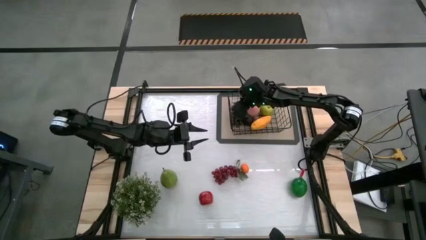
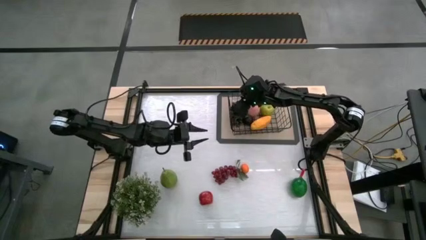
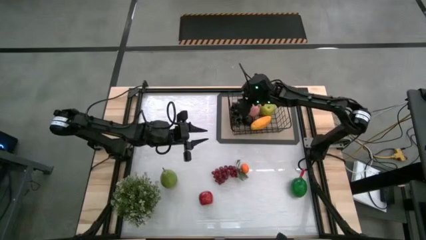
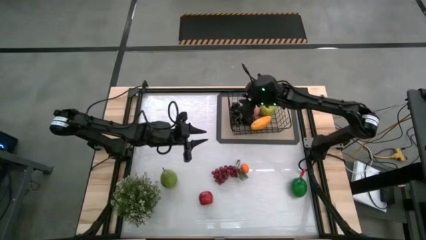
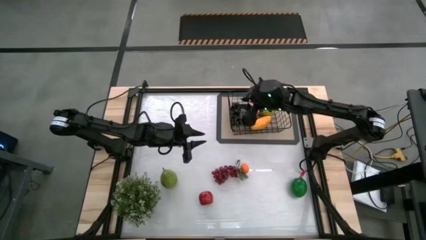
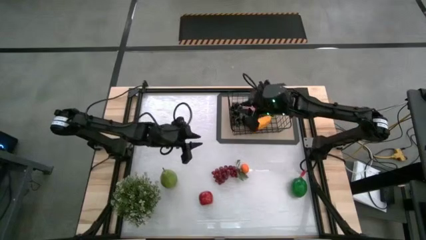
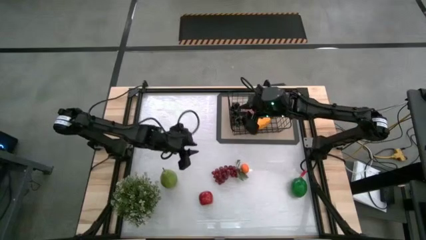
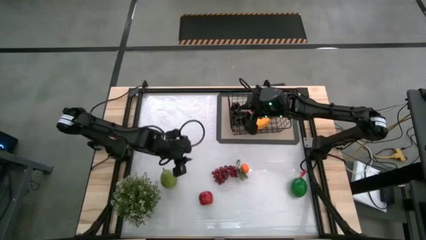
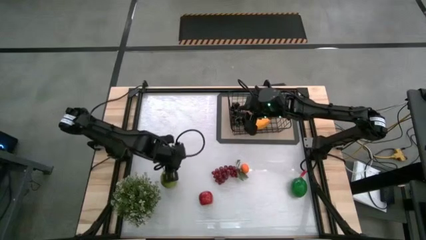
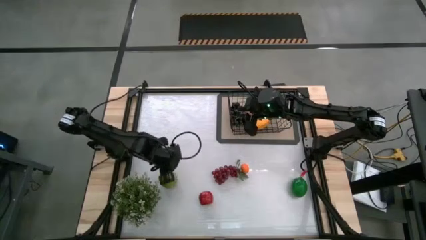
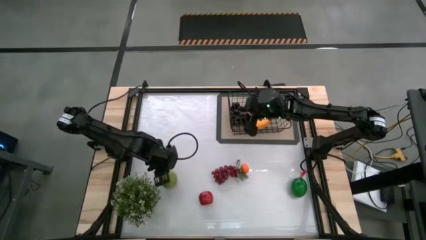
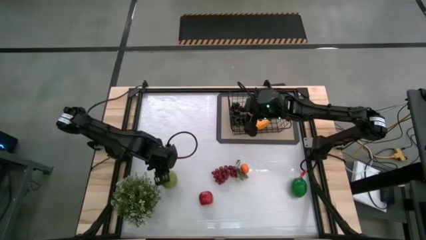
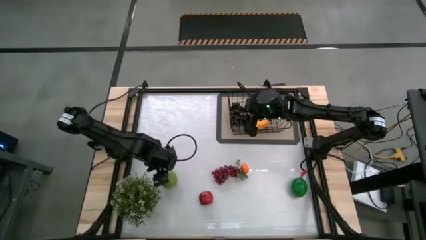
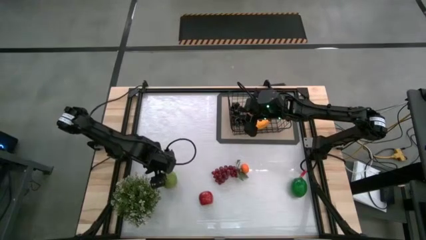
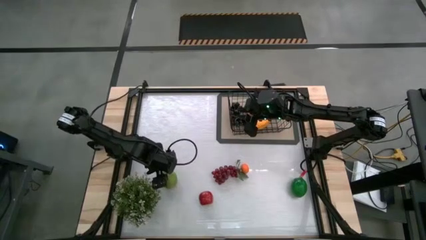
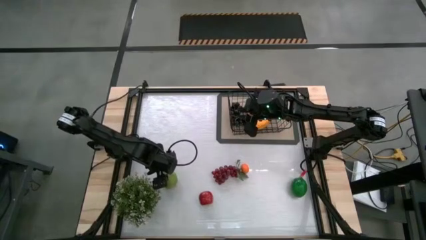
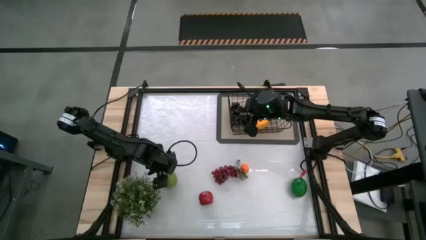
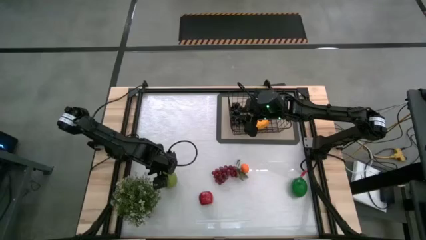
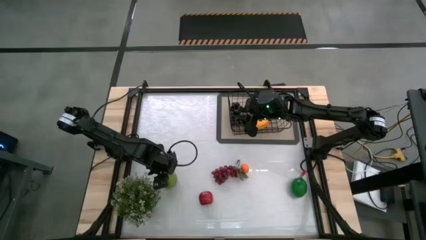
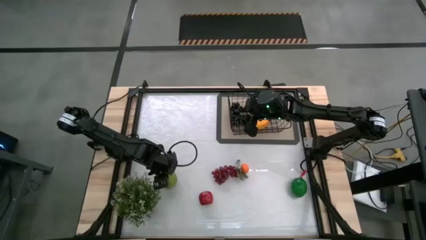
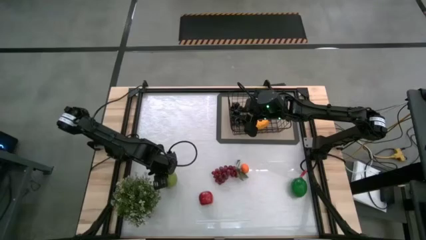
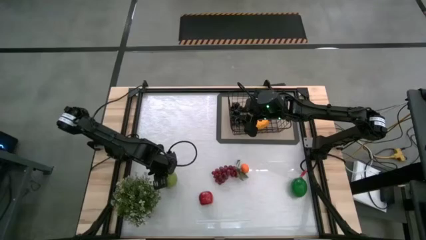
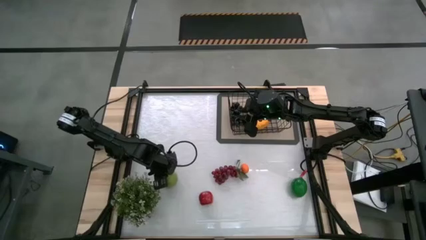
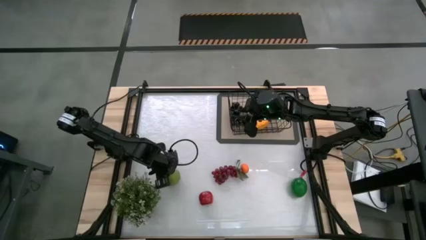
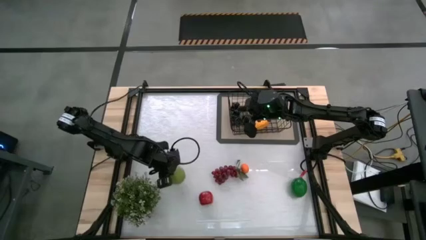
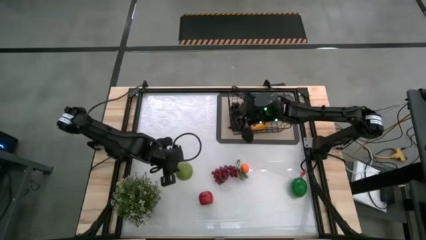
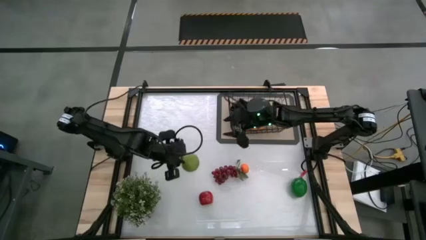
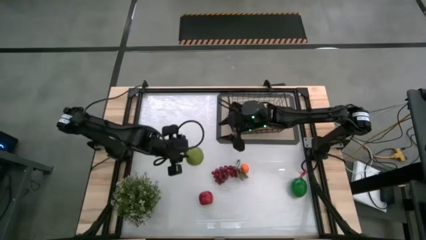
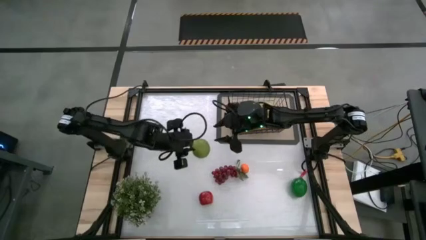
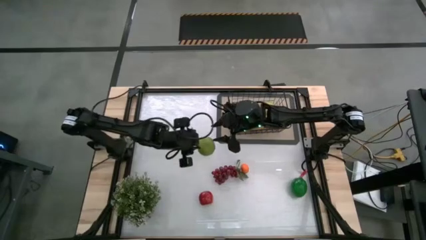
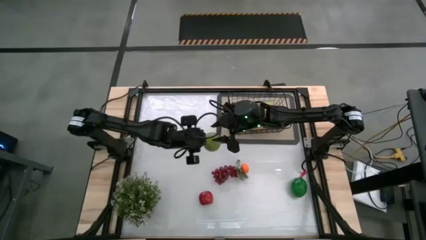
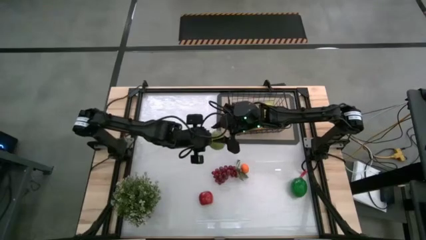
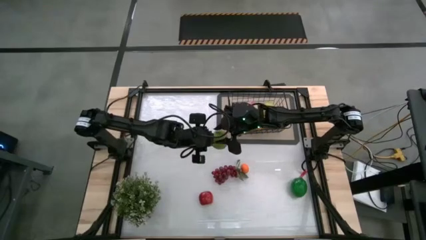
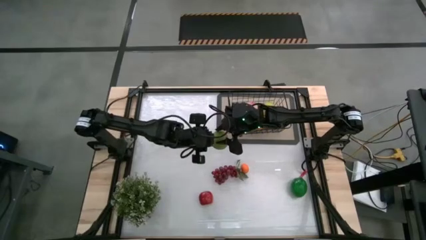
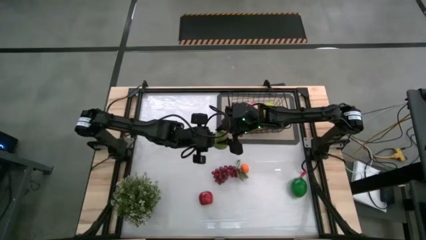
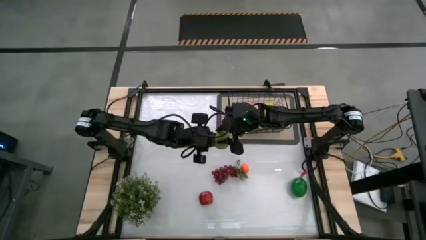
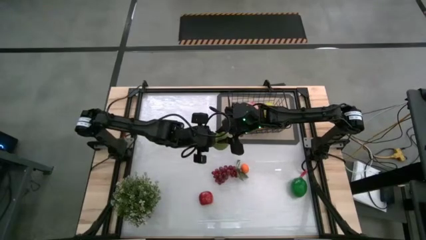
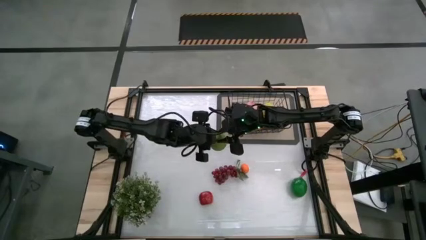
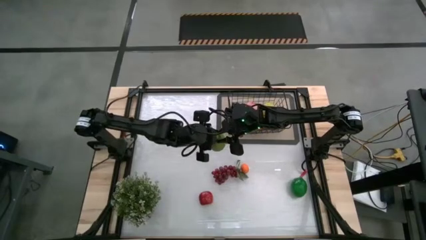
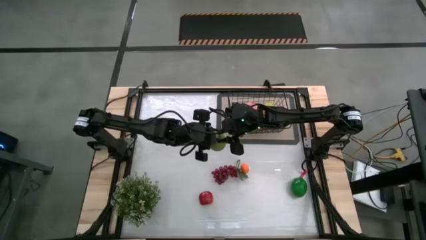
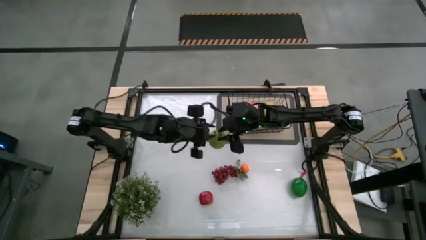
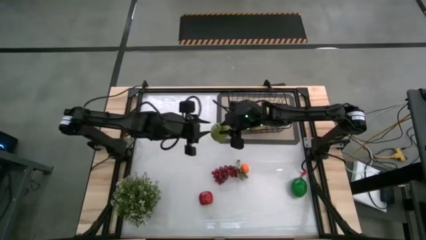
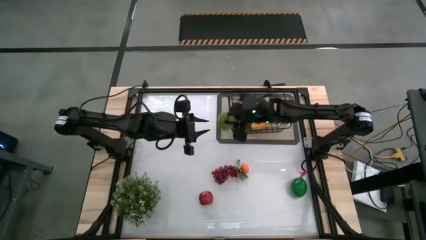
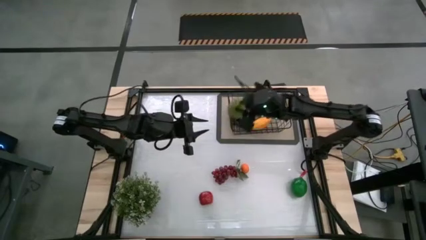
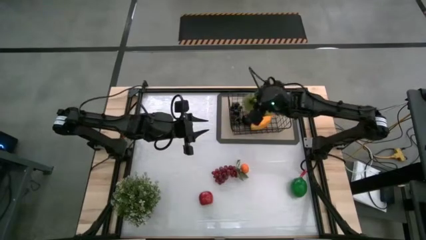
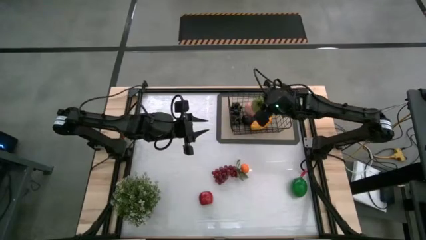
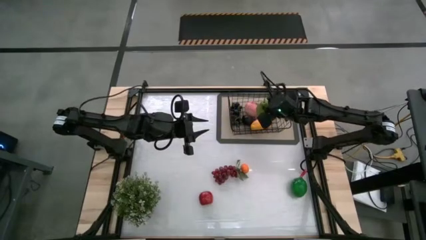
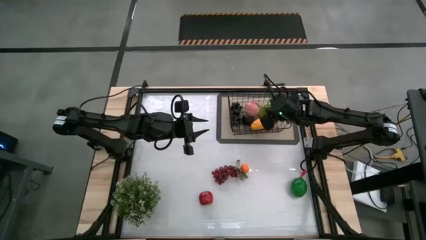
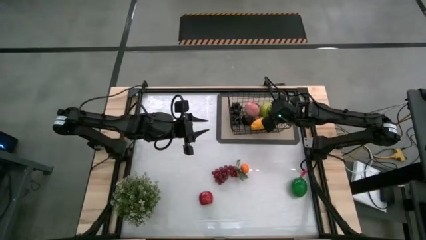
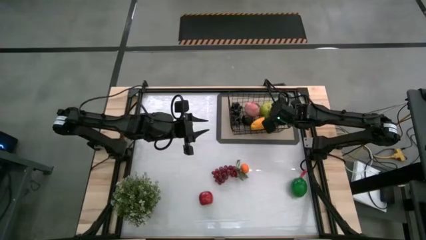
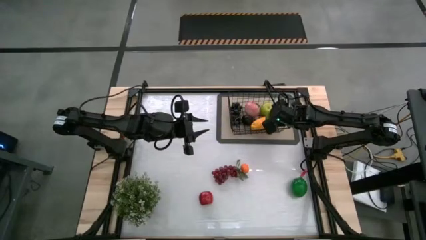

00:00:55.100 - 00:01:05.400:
Task: Build produce basket
Put the pear into the black basket

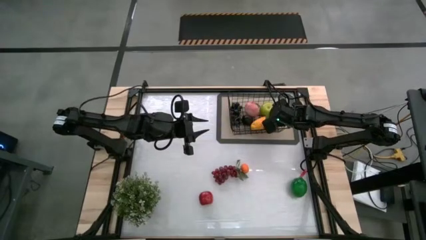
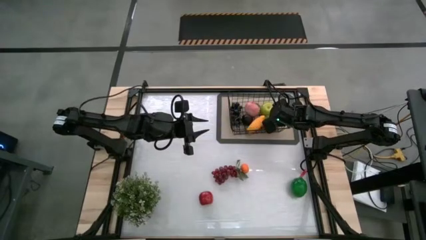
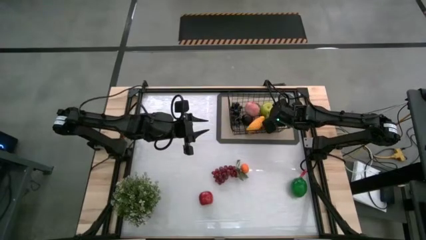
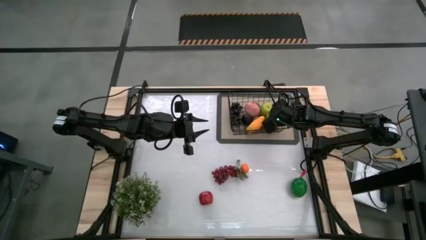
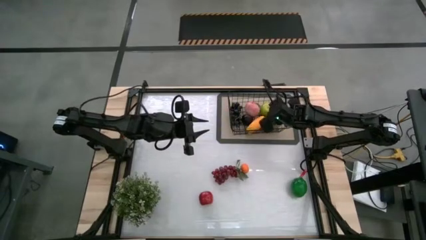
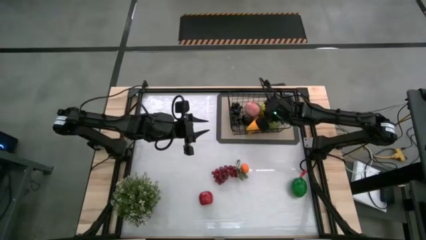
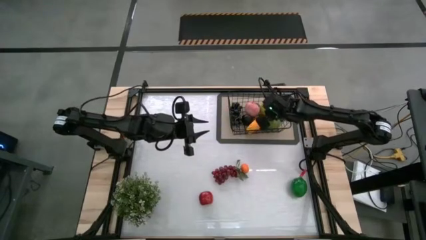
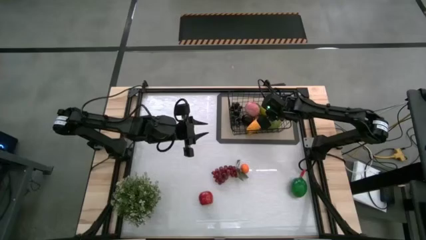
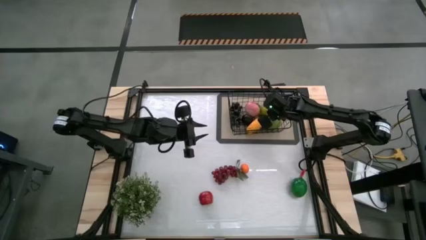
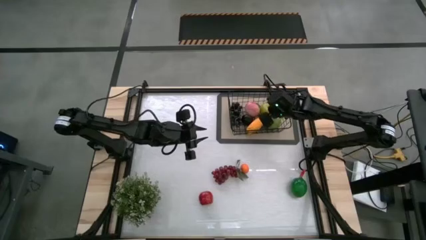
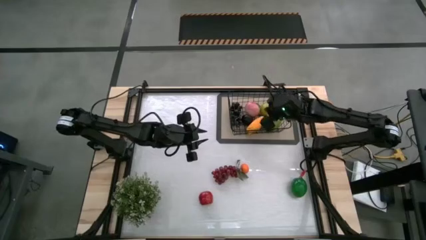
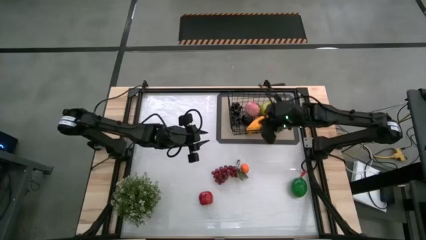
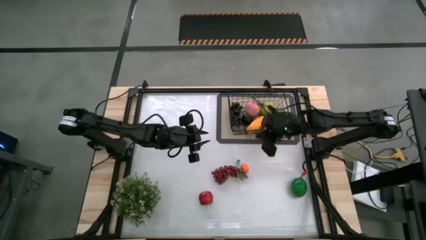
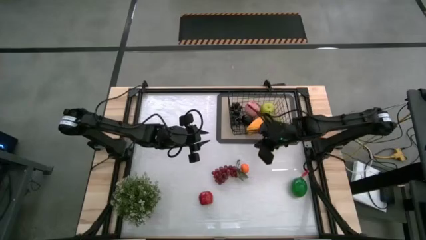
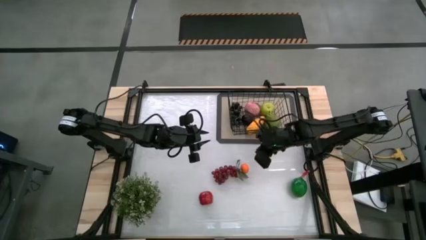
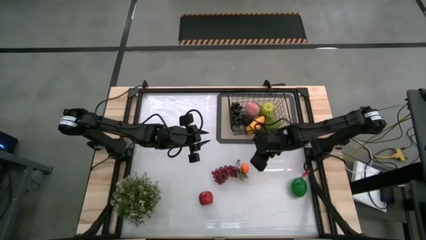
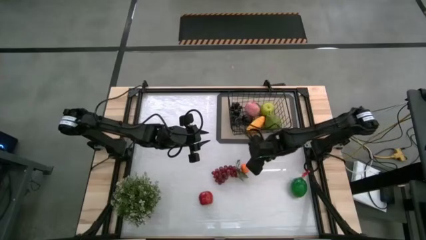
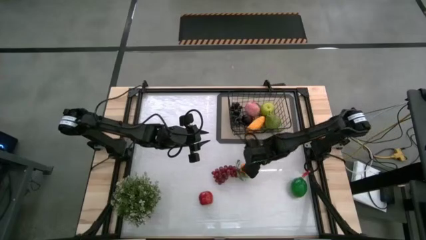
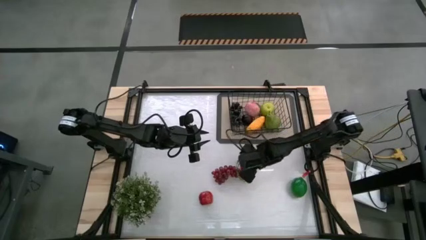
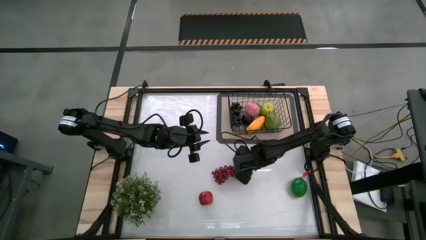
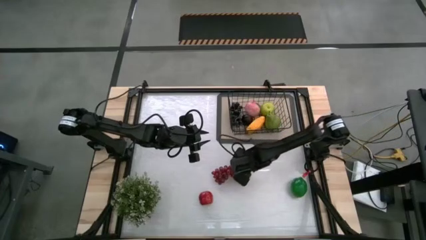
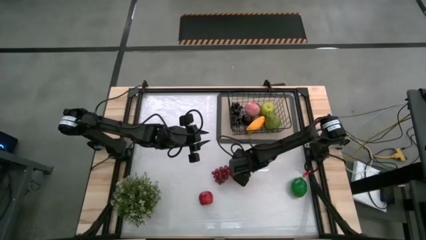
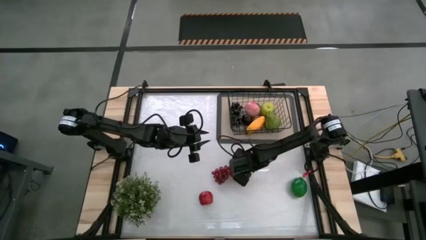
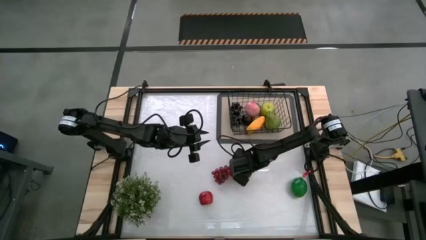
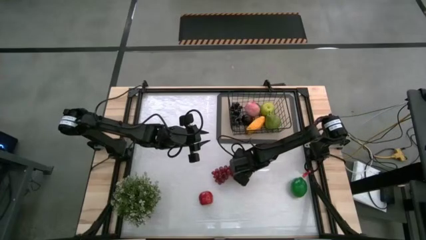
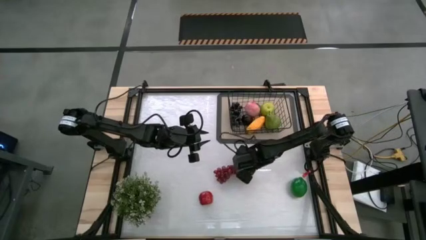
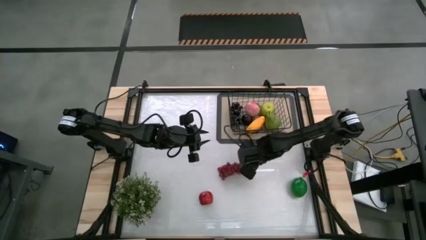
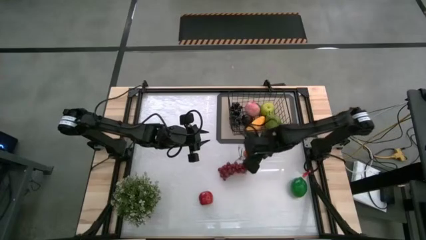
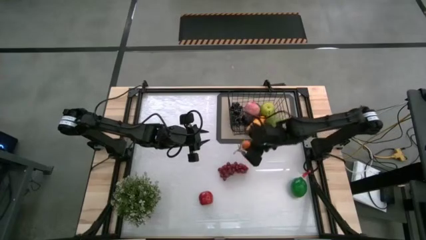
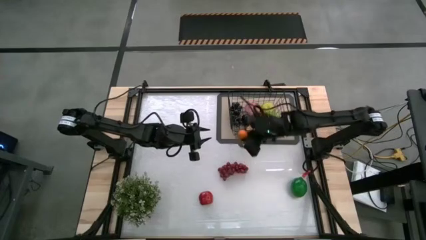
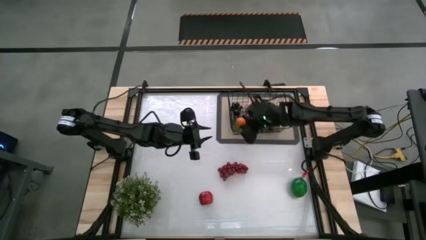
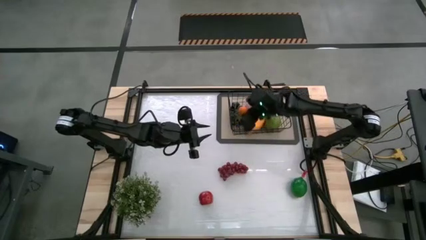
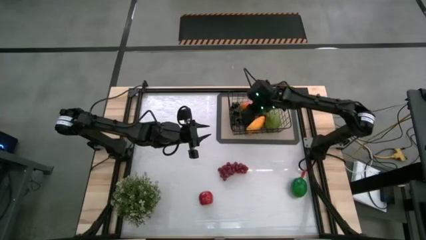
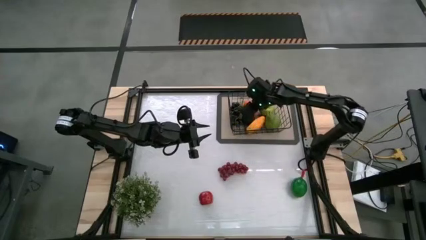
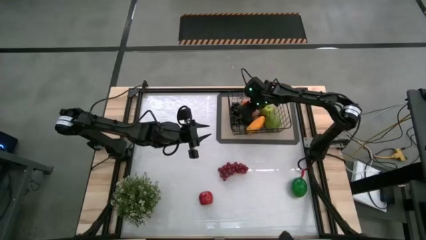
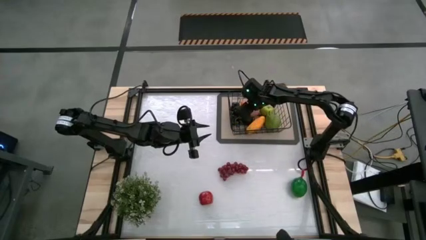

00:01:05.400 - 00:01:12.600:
Put the orange into the black basket
